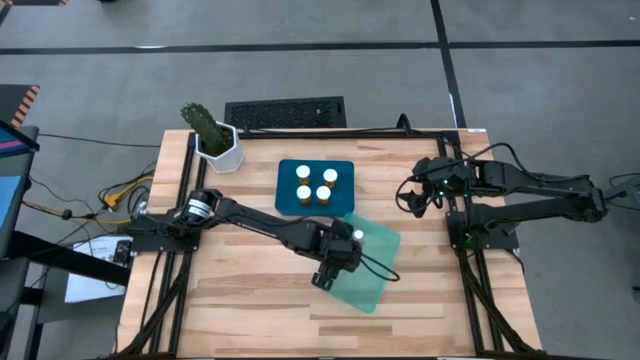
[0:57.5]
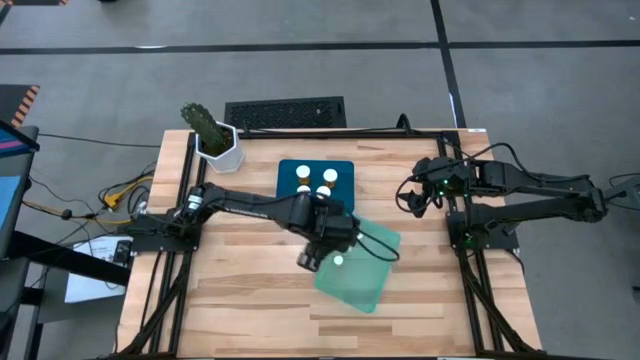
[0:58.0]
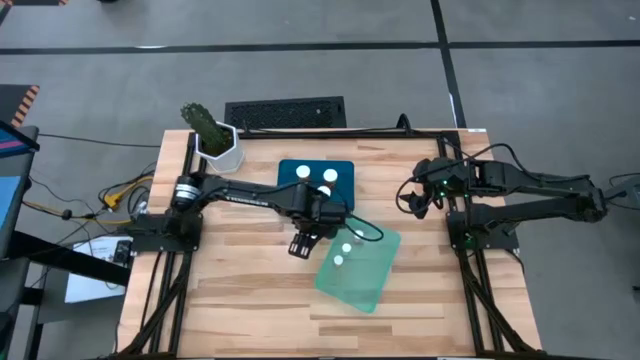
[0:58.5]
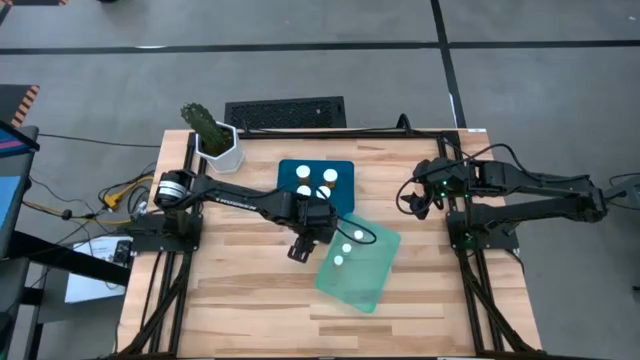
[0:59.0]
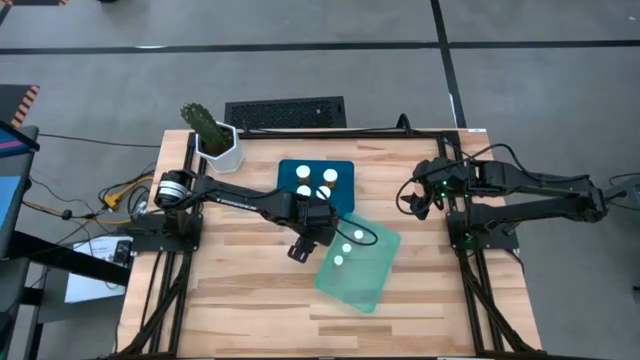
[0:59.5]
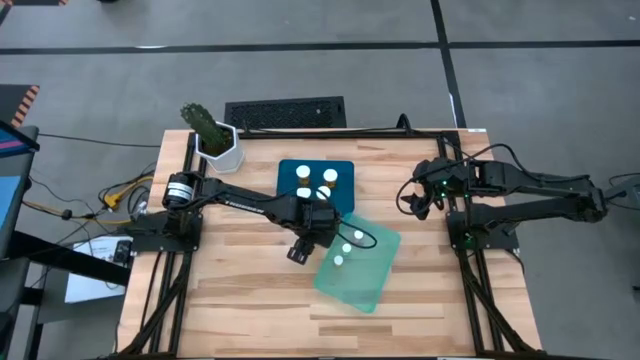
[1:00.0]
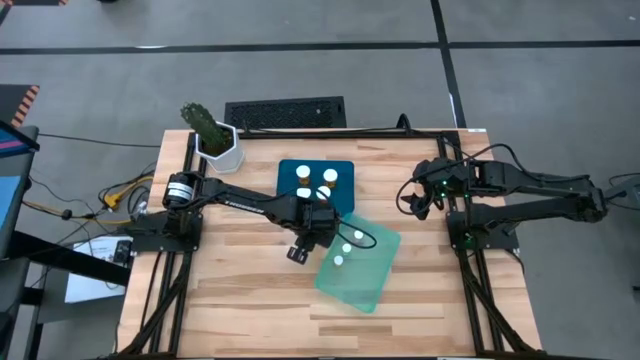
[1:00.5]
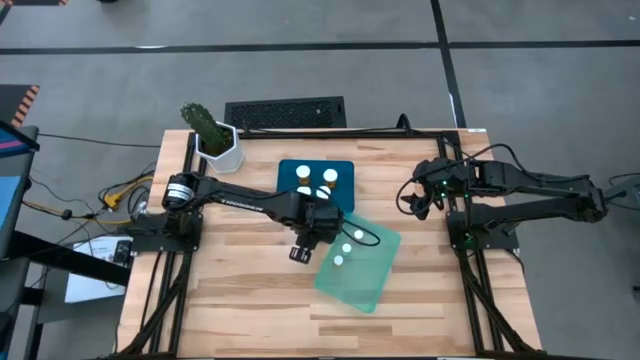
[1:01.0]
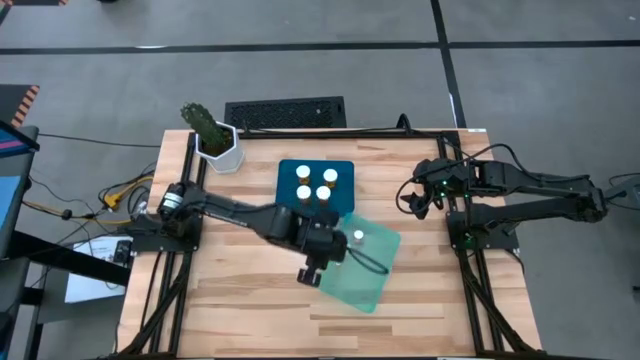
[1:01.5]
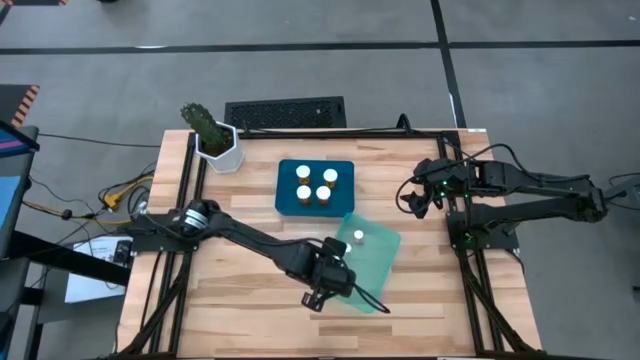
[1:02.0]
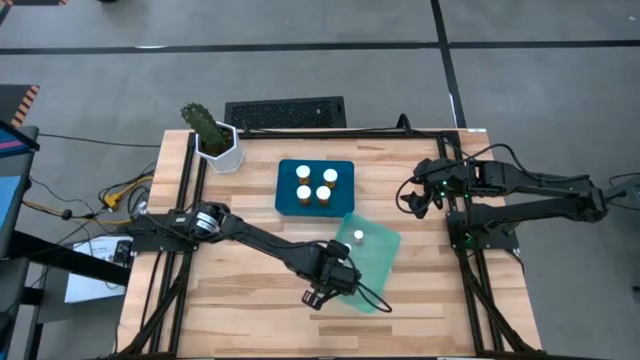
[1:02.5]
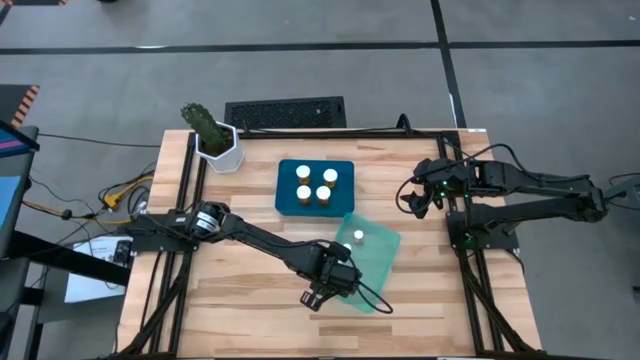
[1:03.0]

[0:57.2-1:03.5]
Task: Pick and place medicine bottles into bin by pill shape (circle, oval)
Put the small yellow pill bottle into the green bin

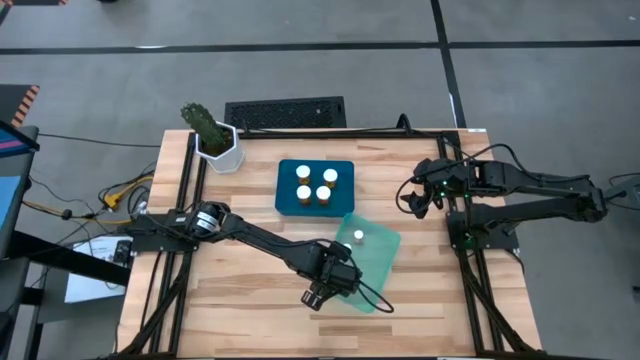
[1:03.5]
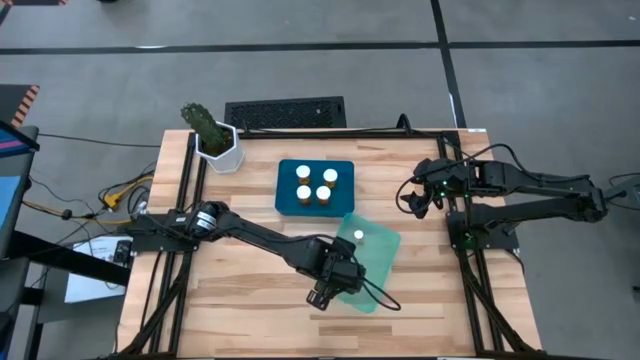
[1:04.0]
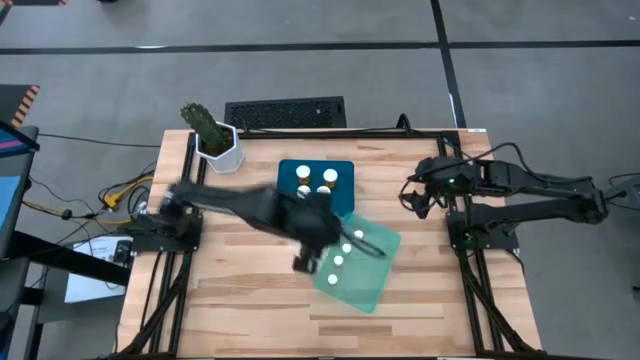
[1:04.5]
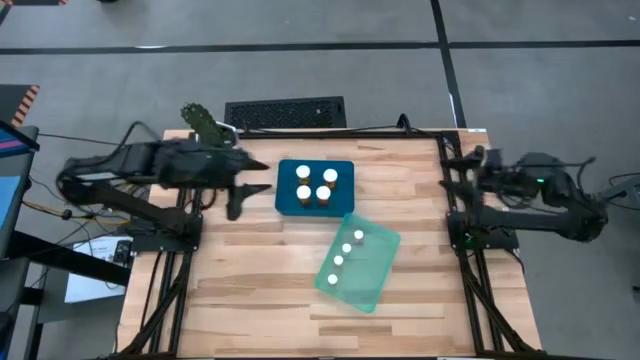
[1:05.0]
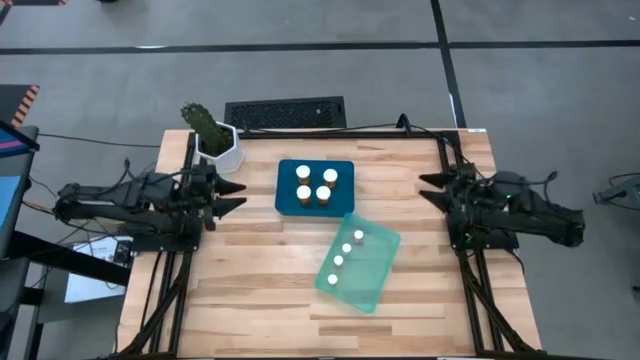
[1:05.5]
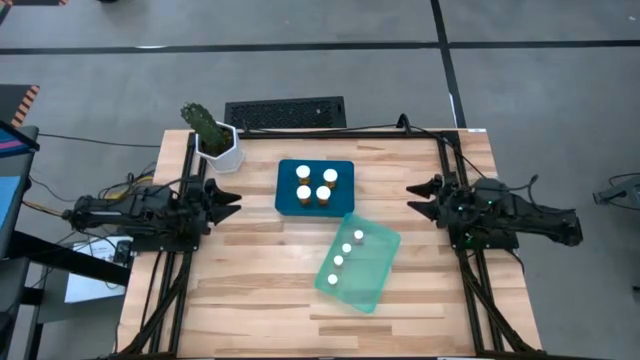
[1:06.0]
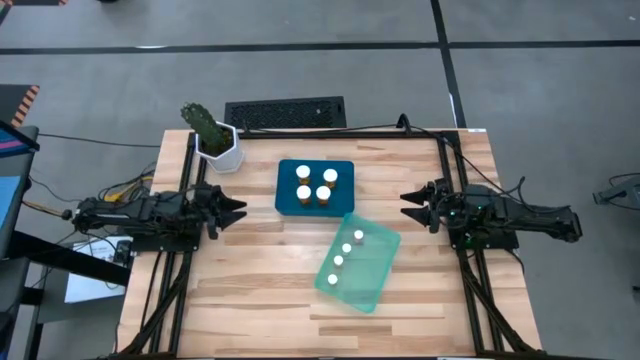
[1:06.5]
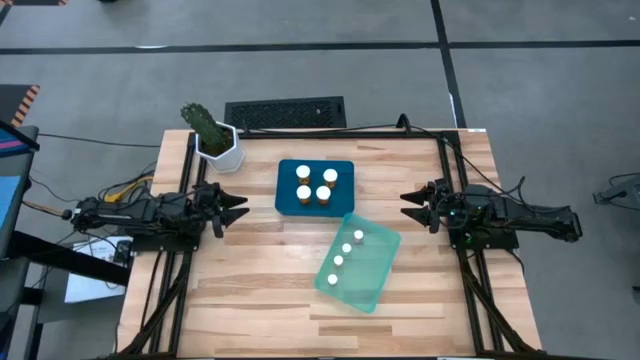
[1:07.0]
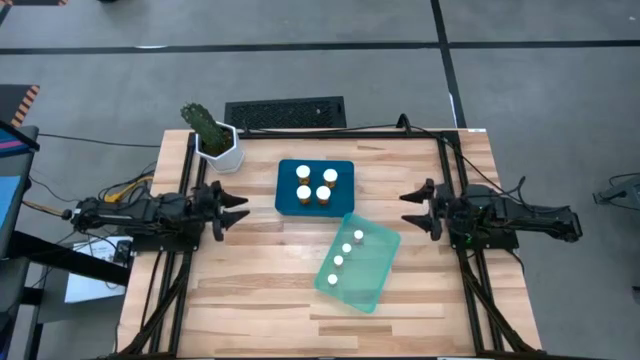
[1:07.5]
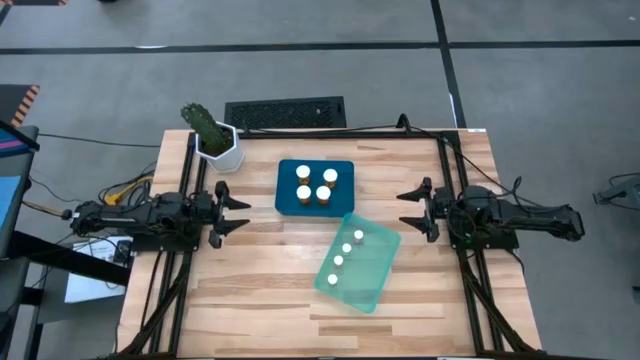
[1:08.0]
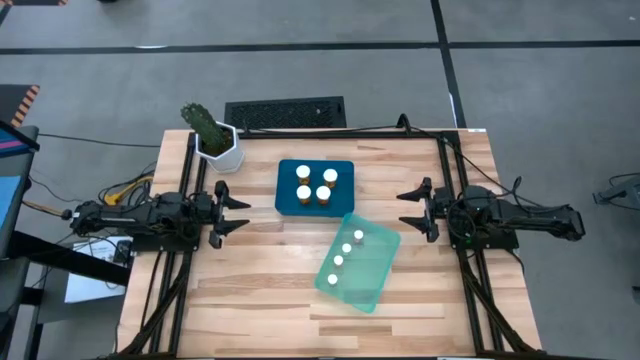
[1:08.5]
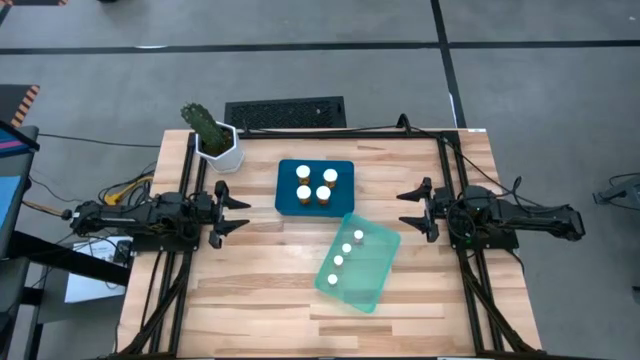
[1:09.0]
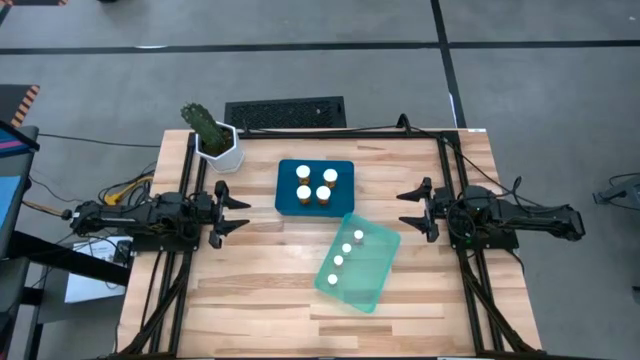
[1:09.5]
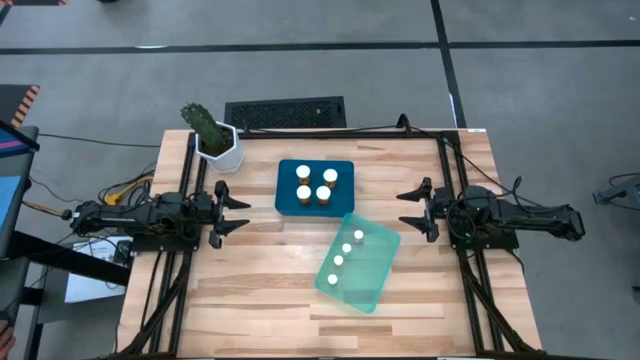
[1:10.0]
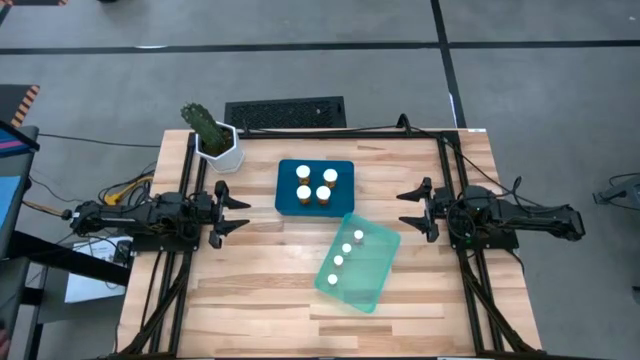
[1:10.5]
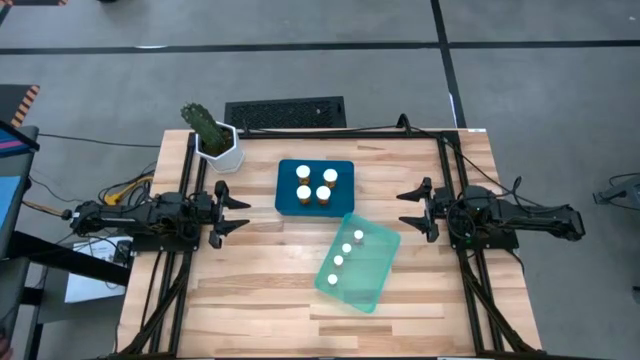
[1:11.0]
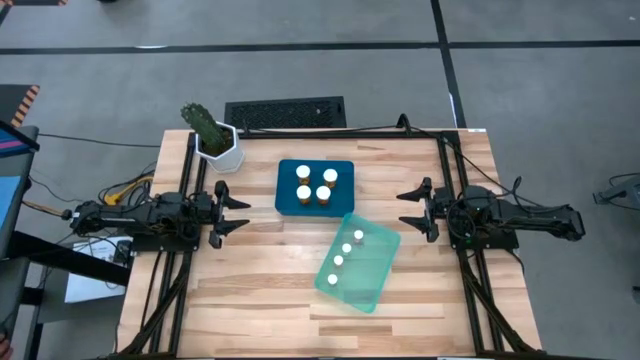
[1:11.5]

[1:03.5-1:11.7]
Return to Home Position

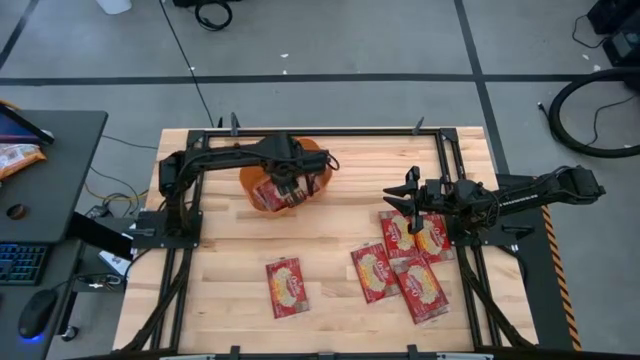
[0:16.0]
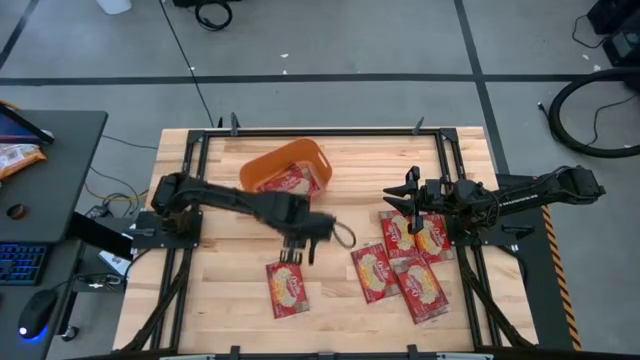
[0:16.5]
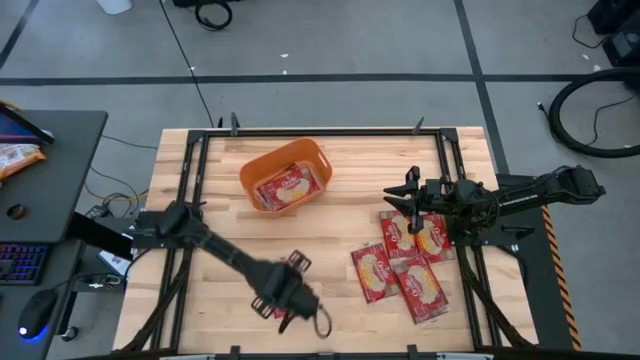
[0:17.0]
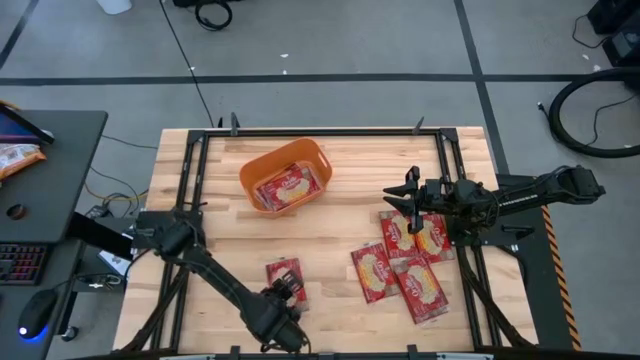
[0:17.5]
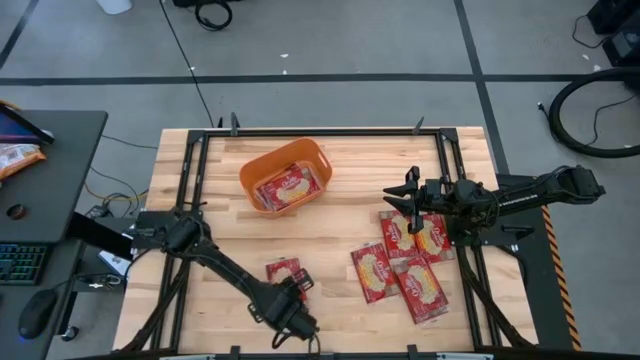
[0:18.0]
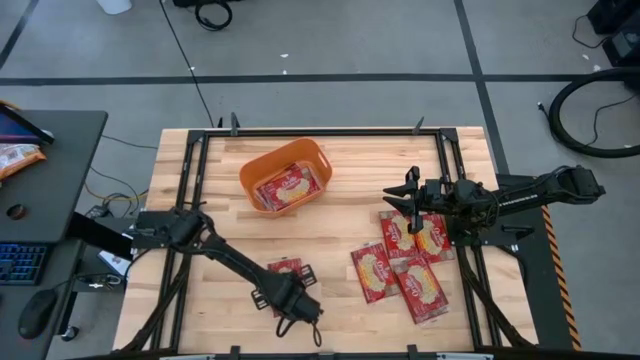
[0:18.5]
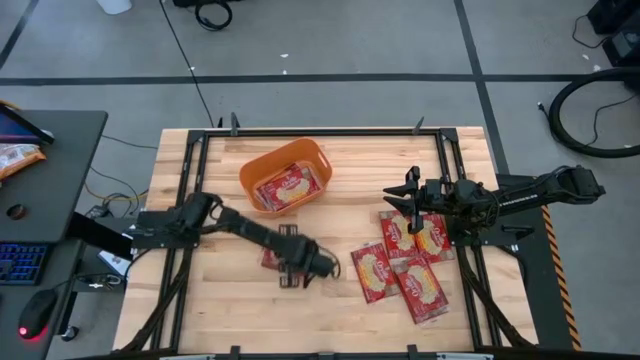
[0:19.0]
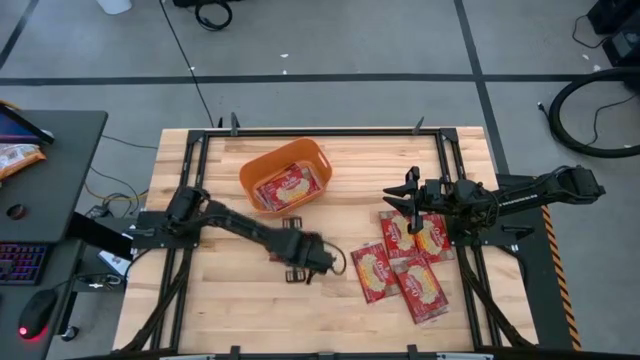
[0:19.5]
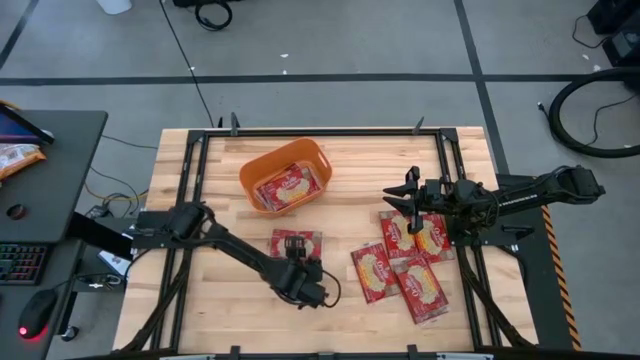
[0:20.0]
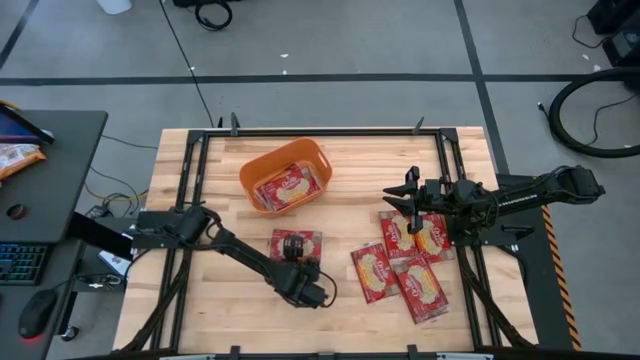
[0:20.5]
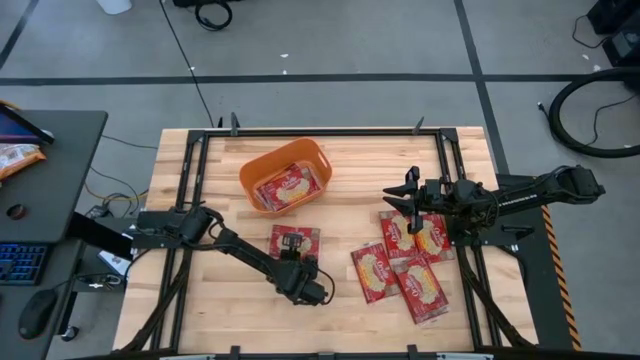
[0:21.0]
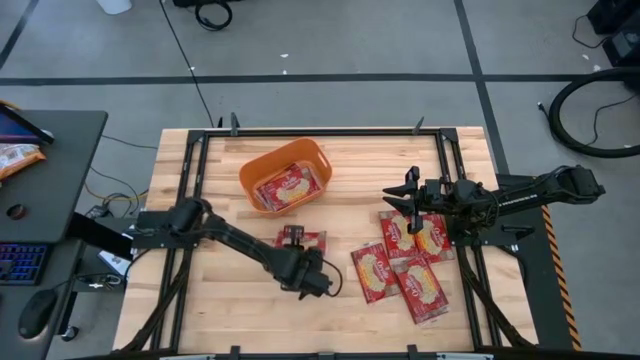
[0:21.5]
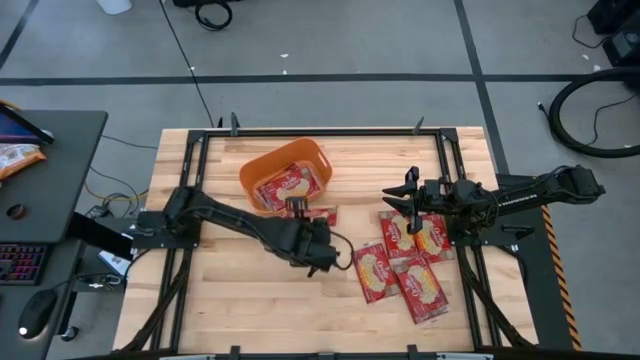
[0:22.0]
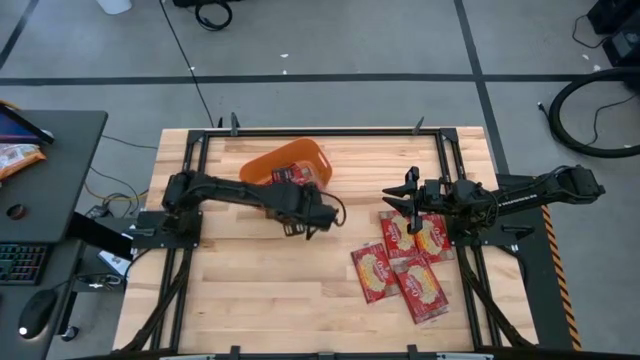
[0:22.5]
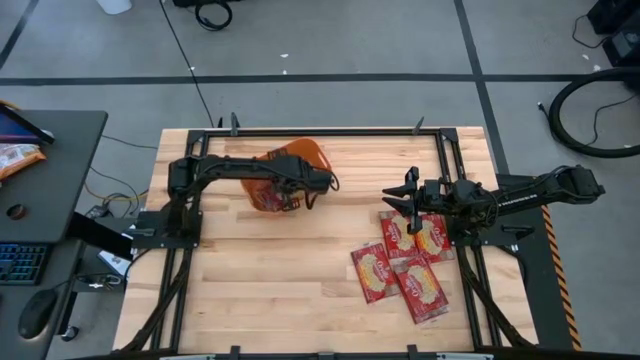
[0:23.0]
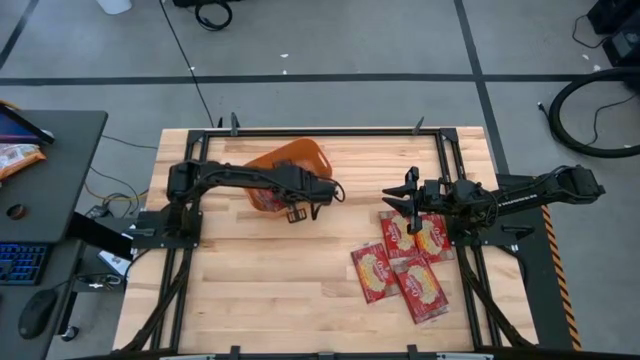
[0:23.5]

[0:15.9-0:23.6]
Task: Sort popcorn bags into baskets
Put the red popcorn bag into the orange bin
